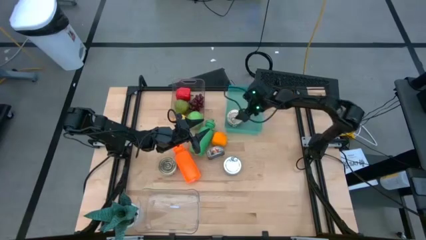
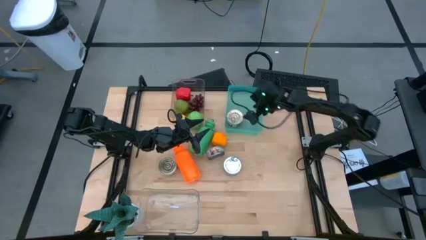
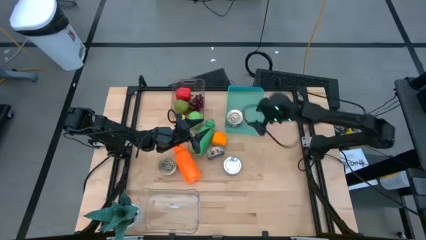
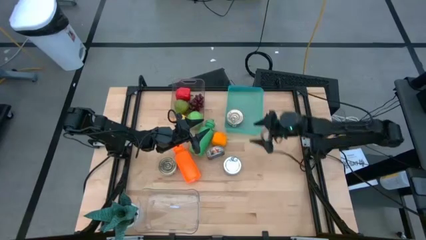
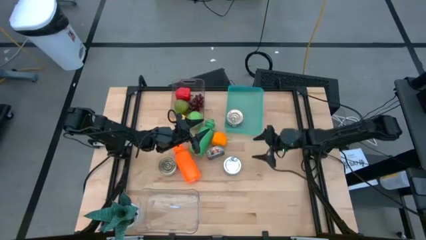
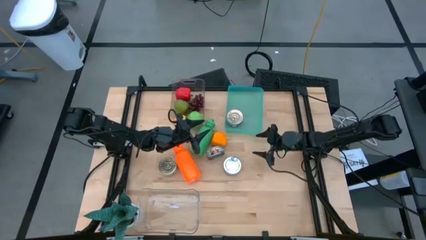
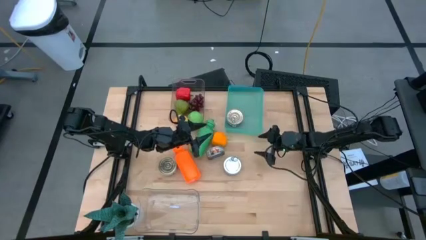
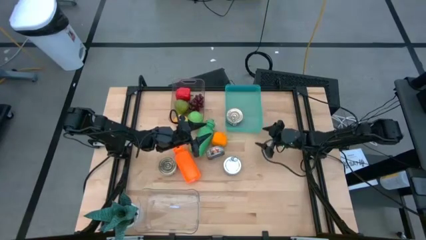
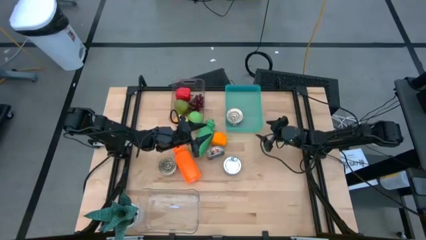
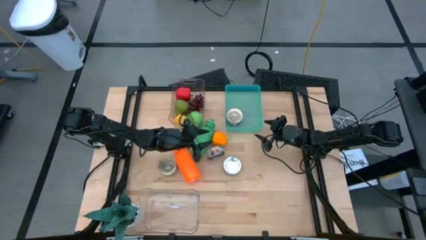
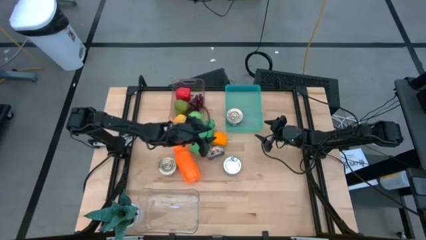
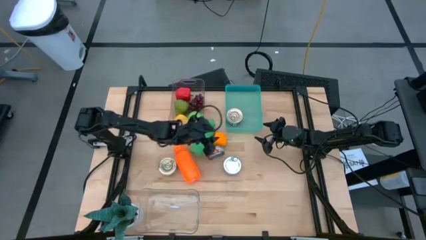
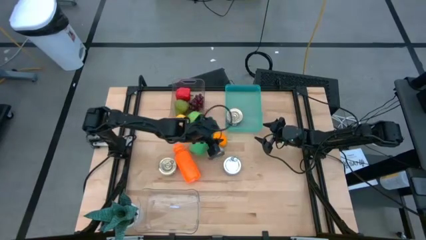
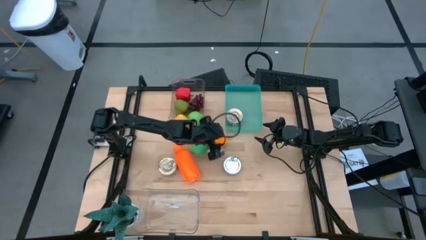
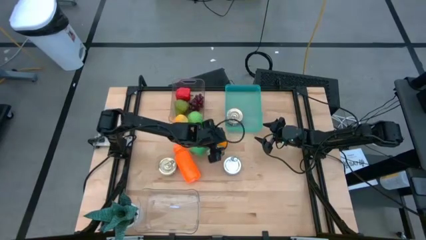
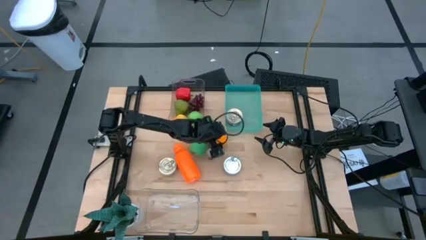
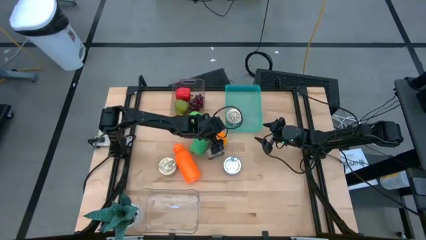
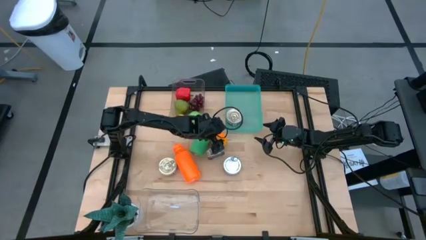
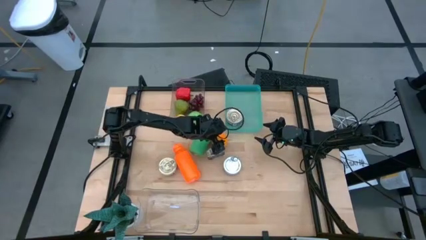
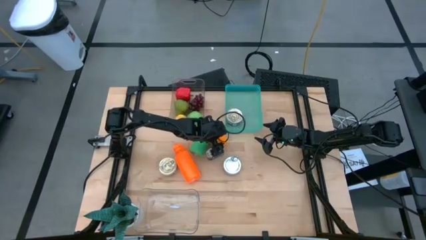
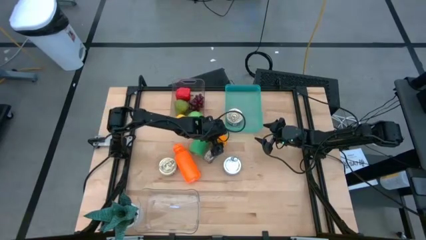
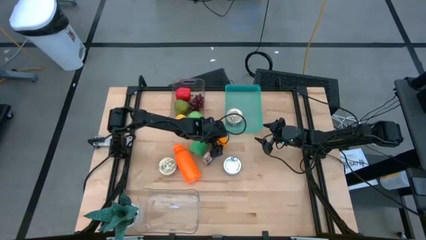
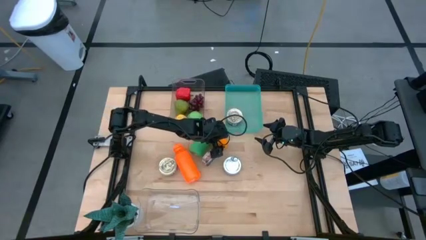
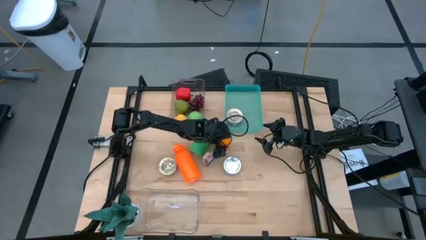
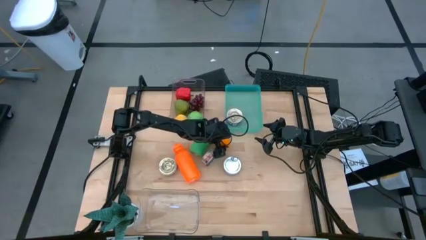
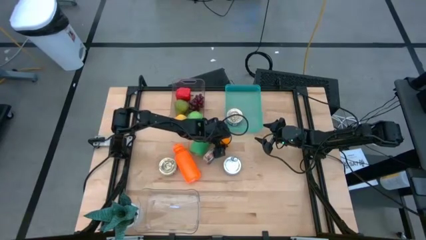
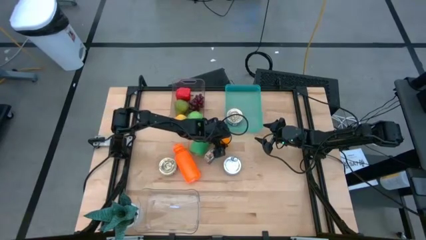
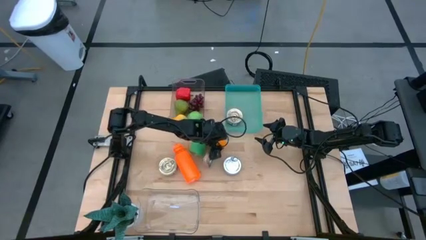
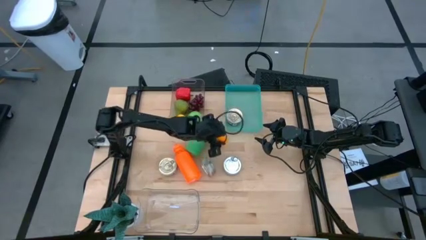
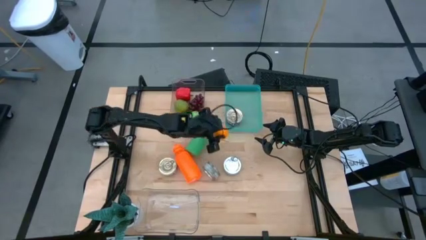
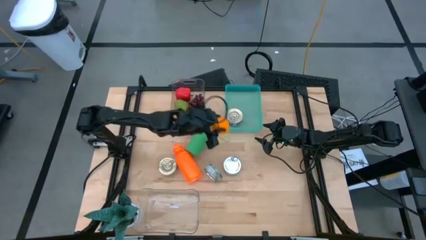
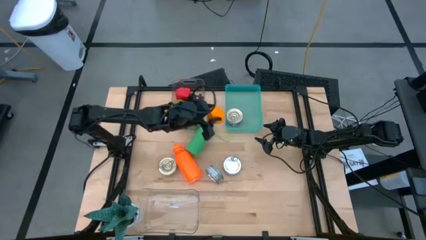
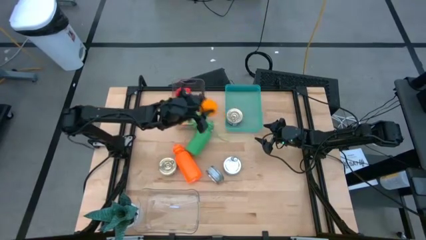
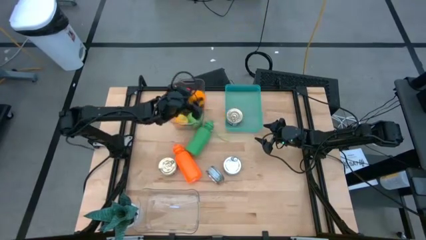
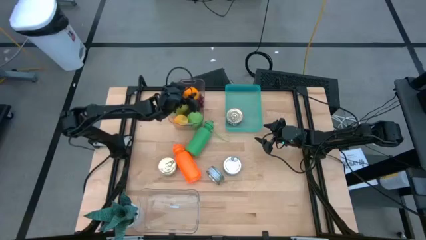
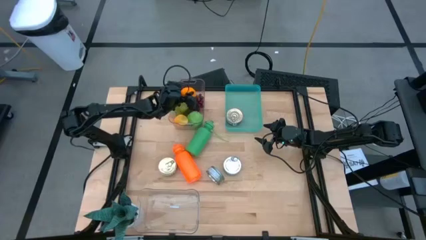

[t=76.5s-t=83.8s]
Task: Pick & Place Food Item
Put the orange into the top transparent bin

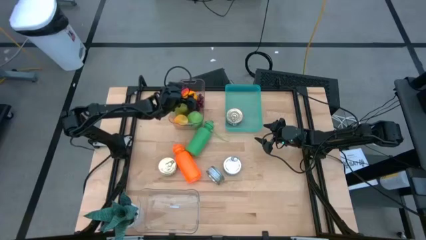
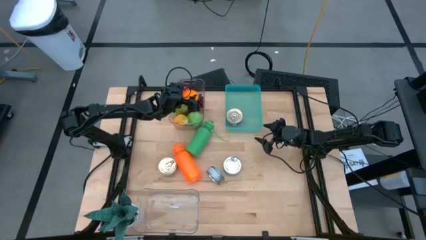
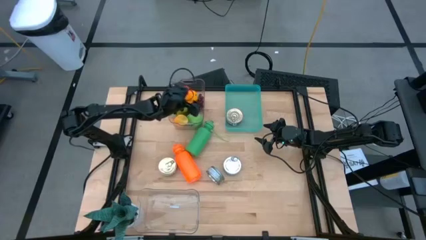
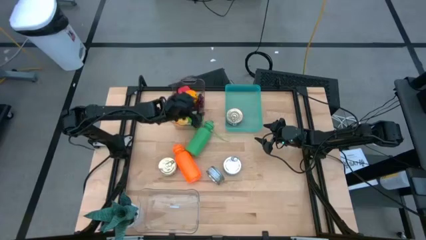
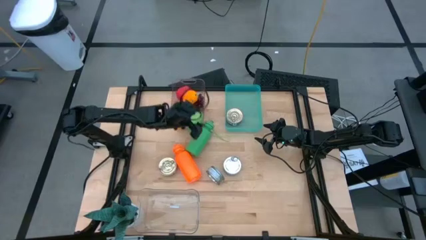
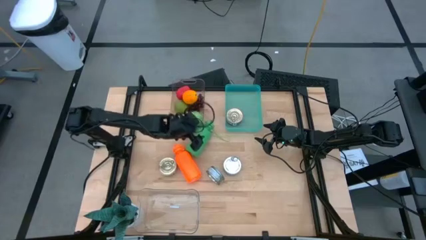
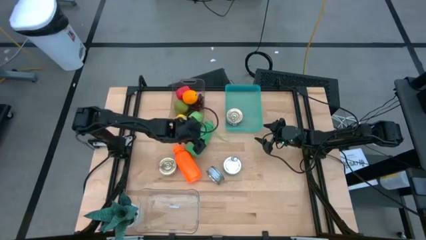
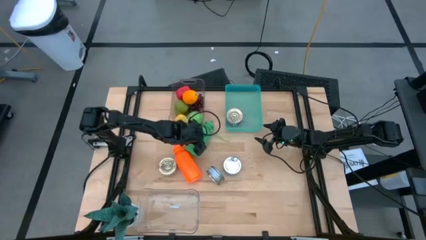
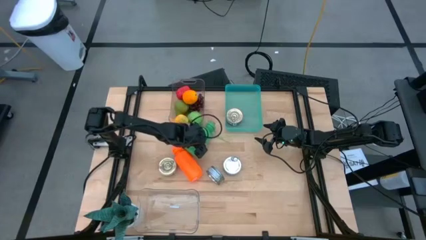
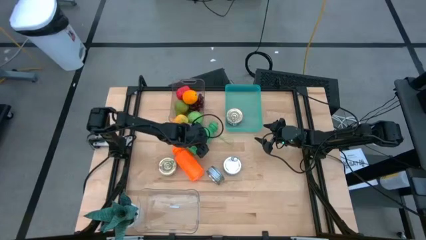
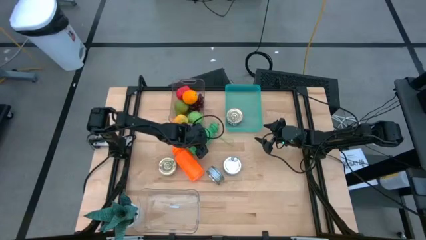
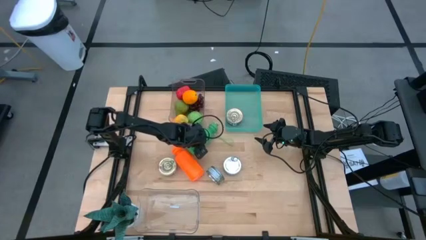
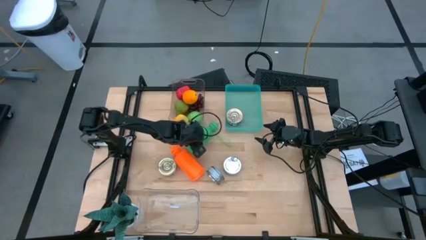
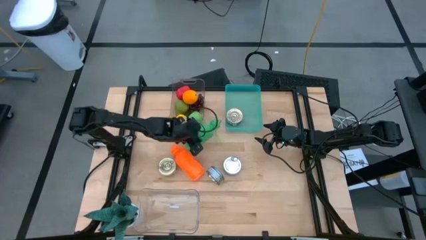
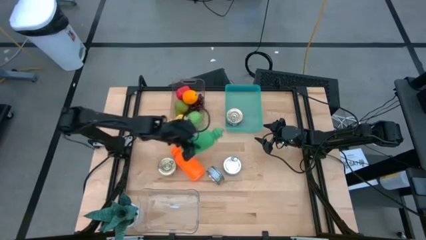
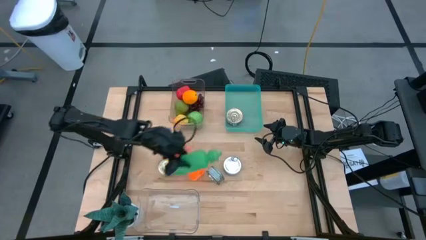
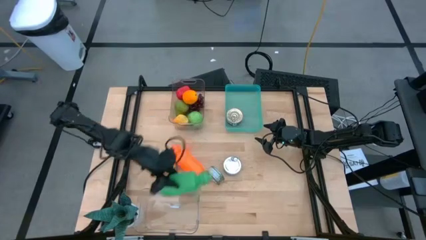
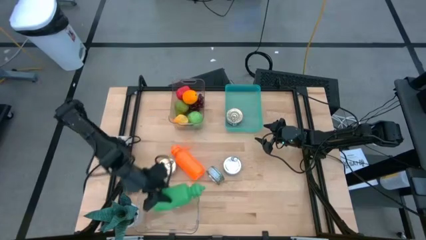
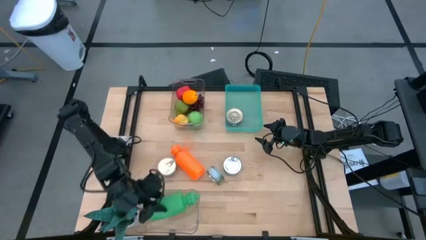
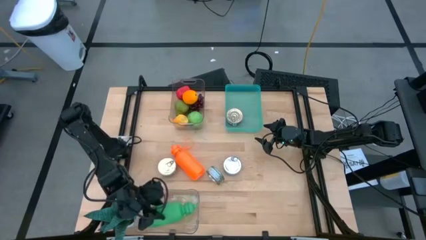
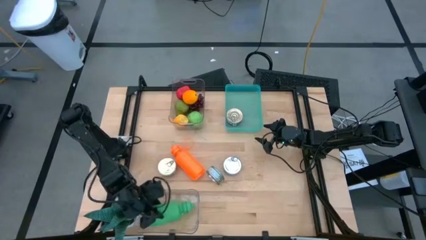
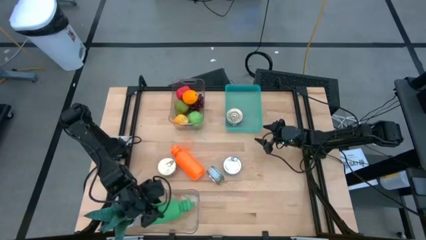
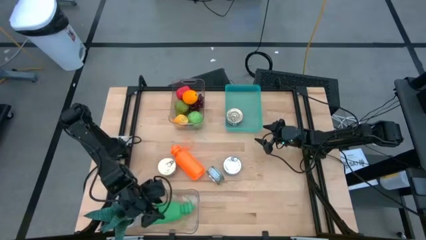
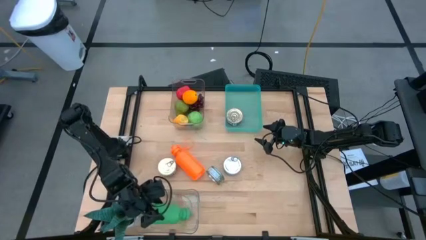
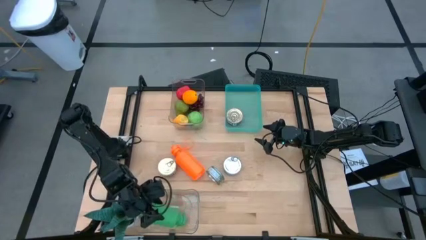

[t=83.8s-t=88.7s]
Put the green tumbler into the bottom transparent bin

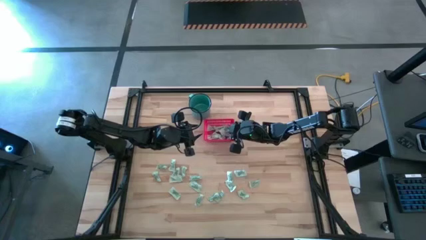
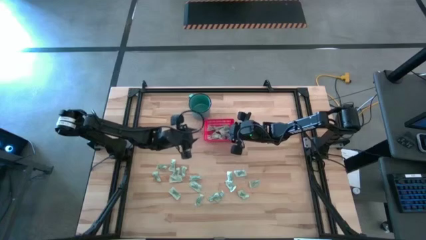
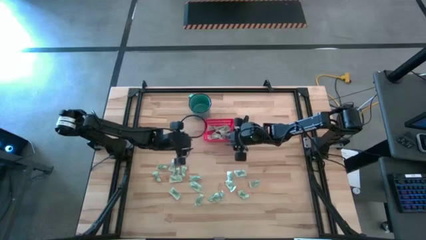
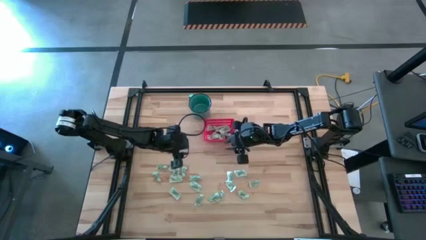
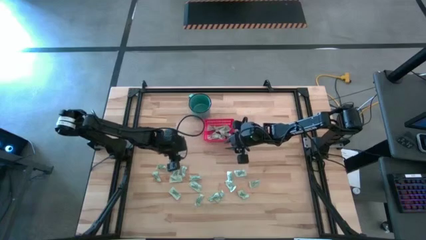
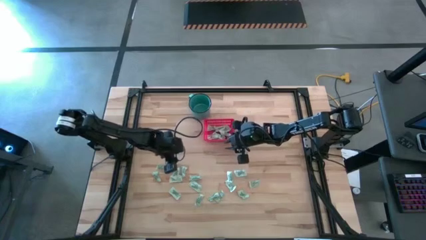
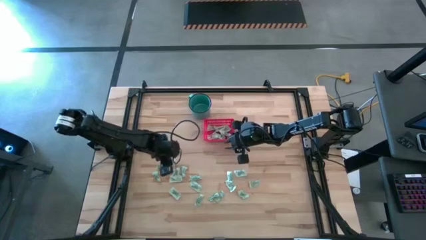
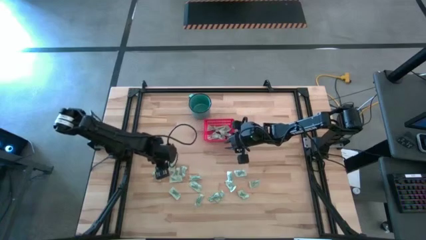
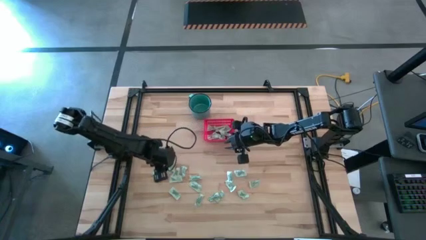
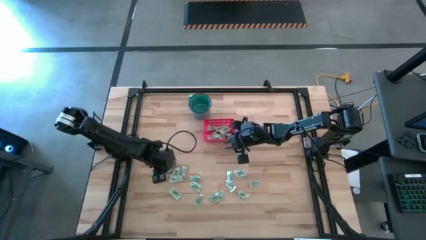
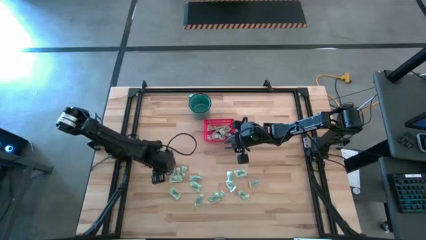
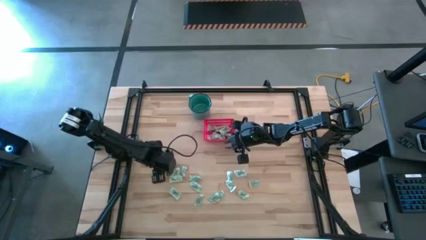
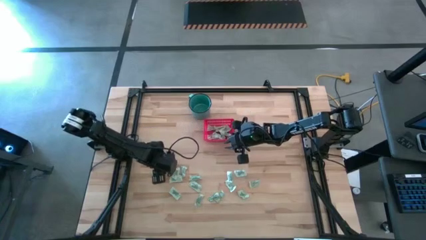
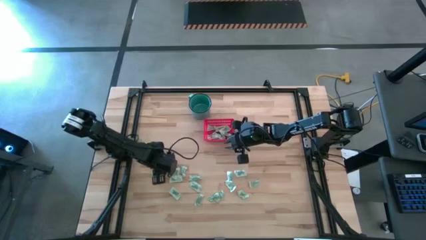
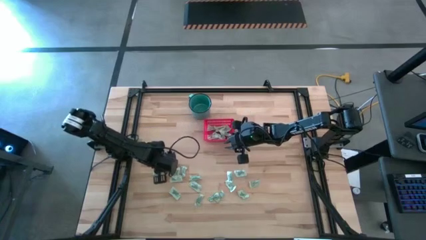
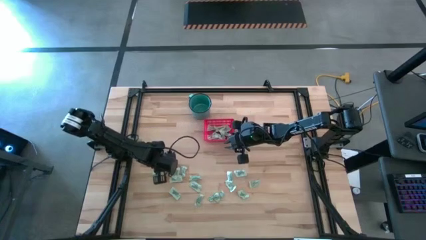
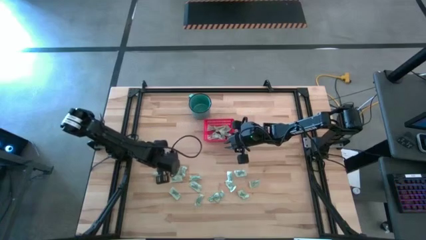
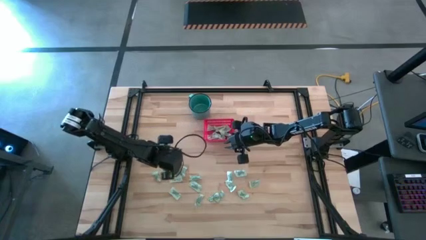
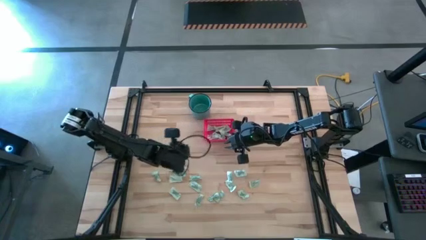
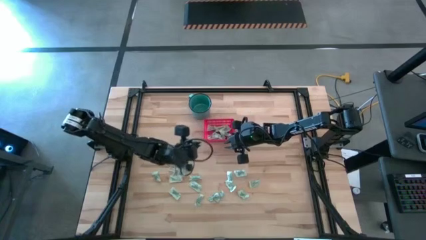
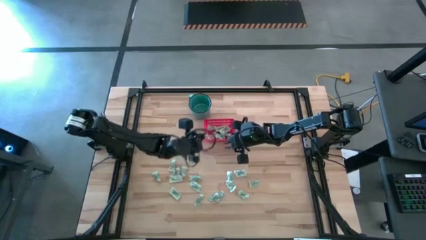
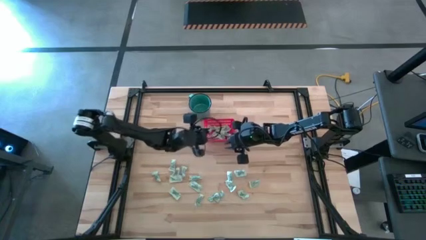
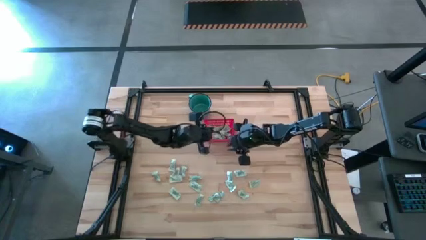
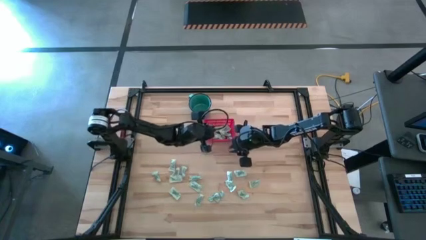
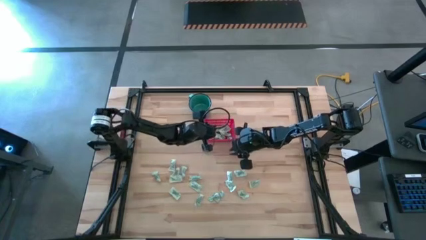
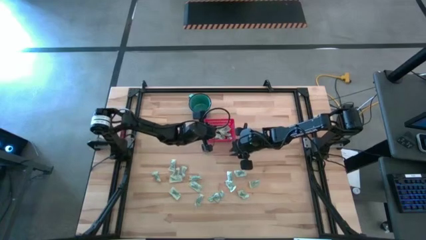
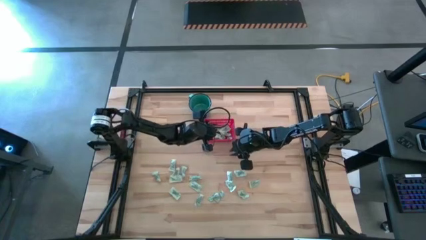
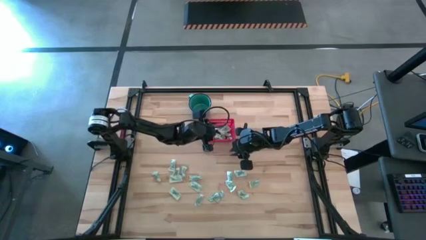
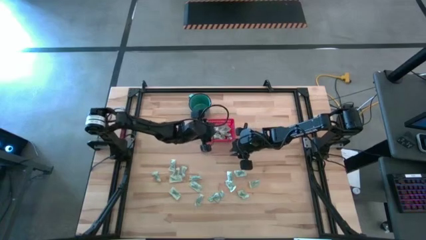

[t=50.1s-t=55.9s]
Task: Pick and place items into bin
Put the light green stevia packet into the red bin
